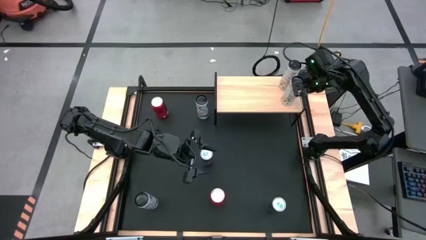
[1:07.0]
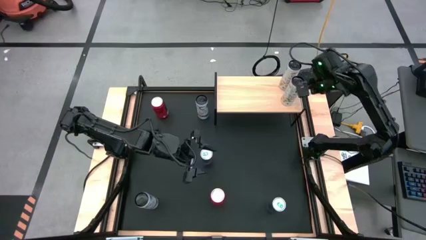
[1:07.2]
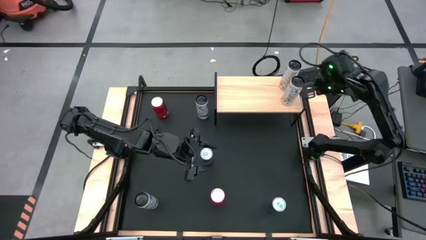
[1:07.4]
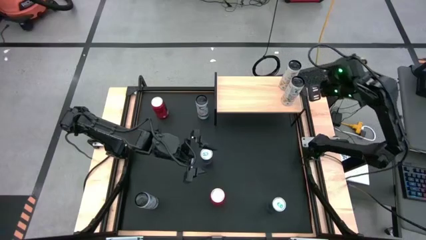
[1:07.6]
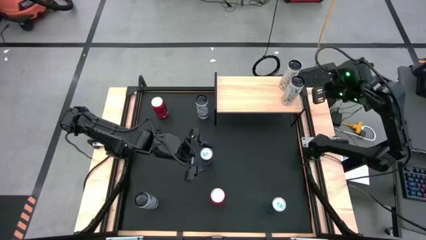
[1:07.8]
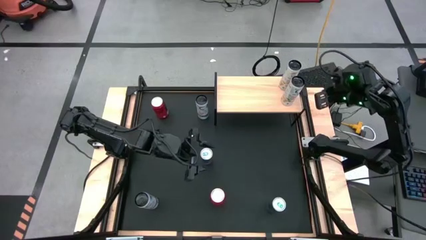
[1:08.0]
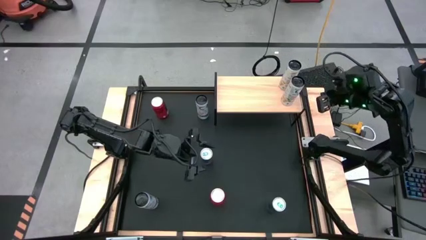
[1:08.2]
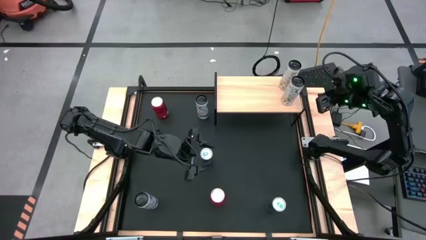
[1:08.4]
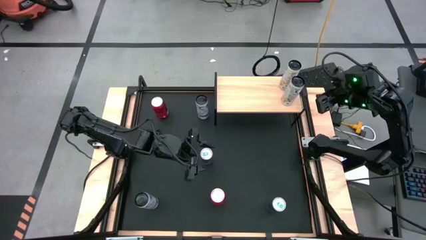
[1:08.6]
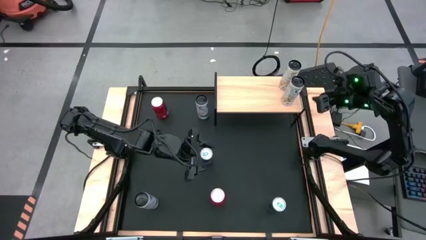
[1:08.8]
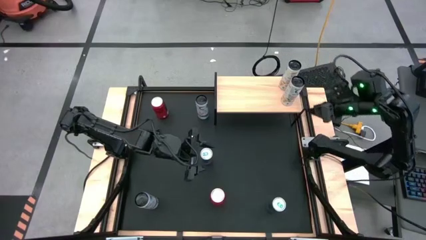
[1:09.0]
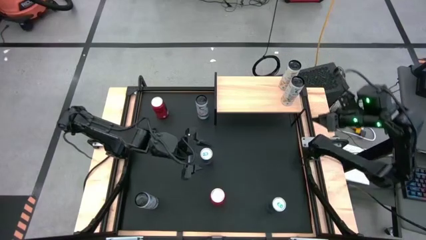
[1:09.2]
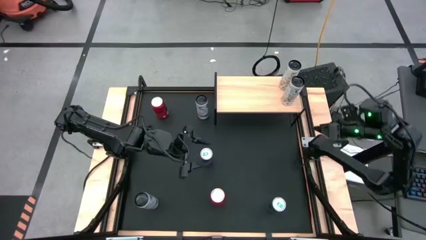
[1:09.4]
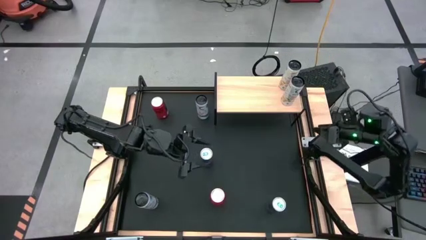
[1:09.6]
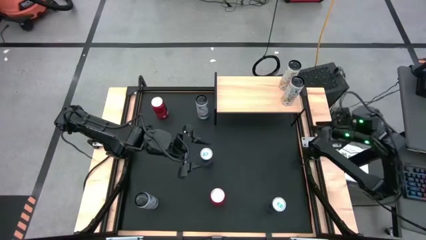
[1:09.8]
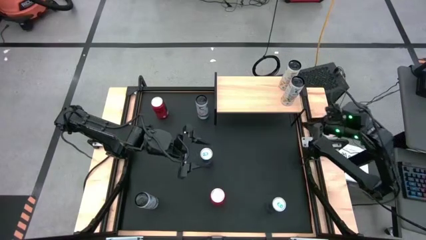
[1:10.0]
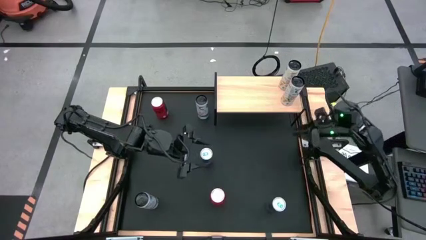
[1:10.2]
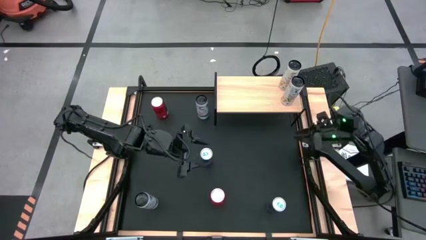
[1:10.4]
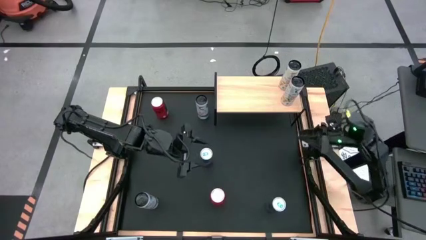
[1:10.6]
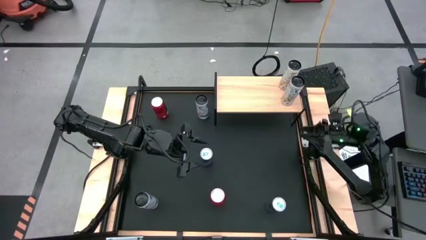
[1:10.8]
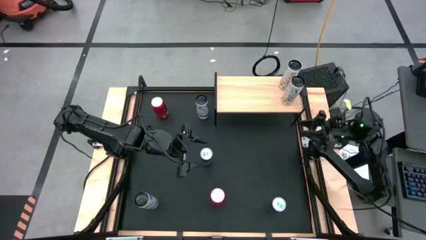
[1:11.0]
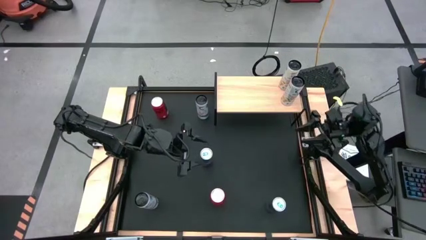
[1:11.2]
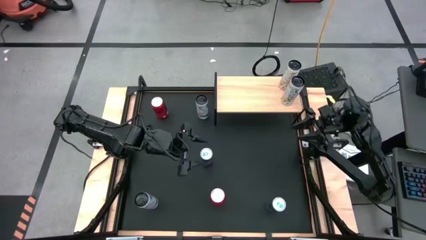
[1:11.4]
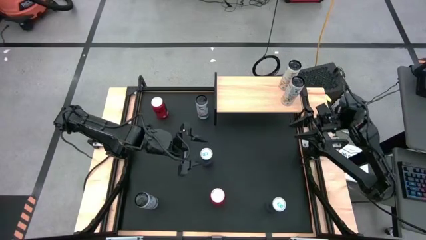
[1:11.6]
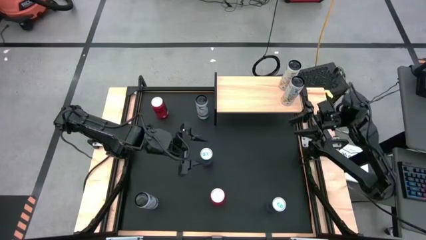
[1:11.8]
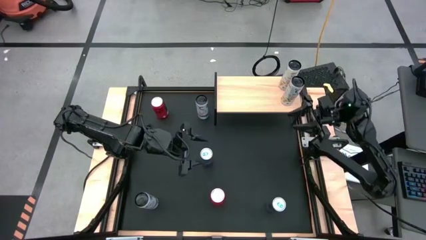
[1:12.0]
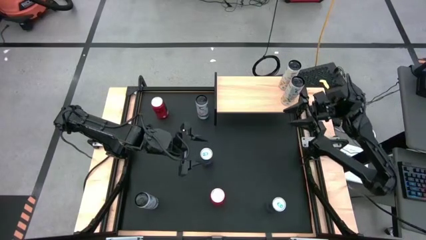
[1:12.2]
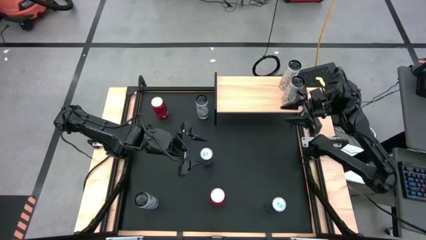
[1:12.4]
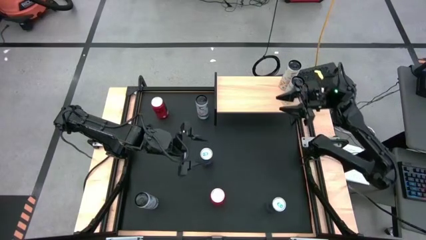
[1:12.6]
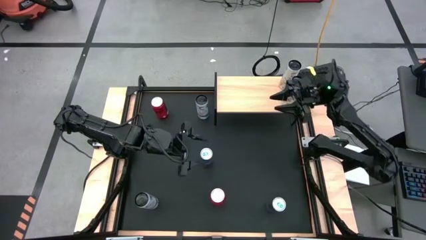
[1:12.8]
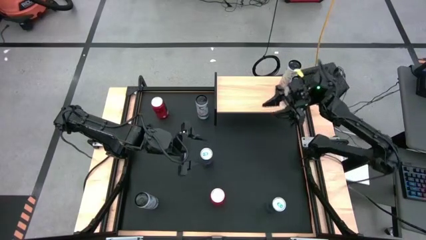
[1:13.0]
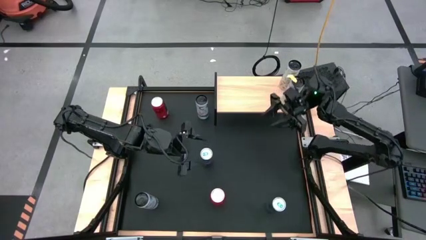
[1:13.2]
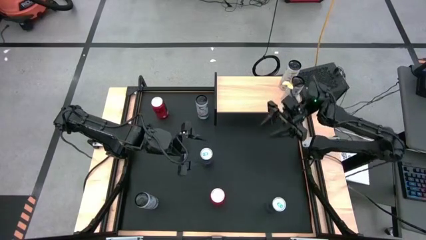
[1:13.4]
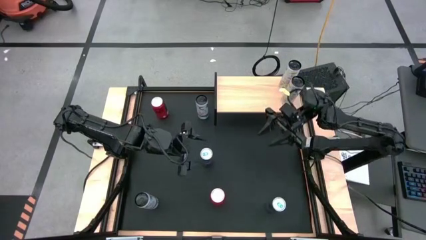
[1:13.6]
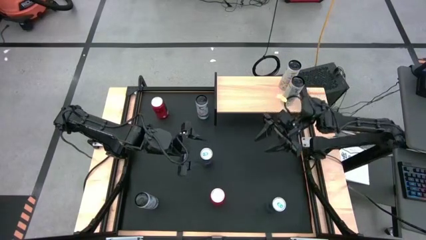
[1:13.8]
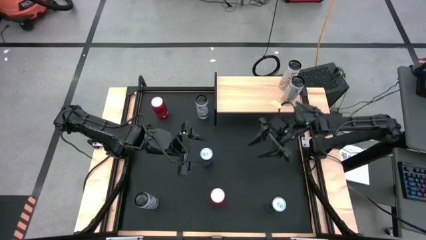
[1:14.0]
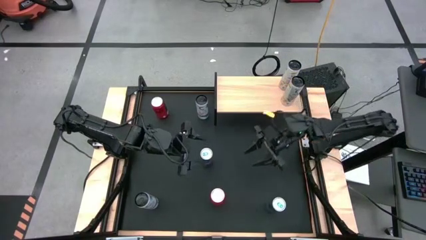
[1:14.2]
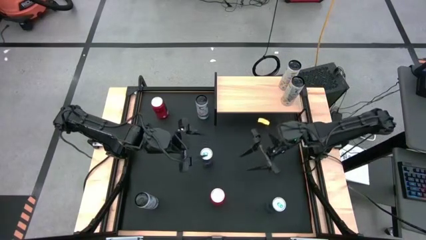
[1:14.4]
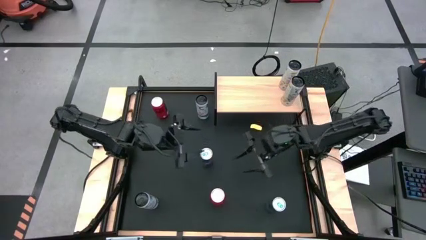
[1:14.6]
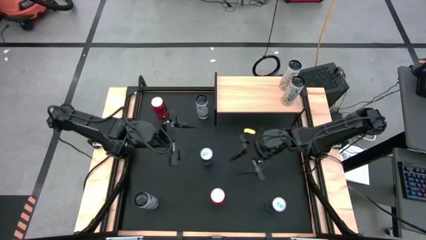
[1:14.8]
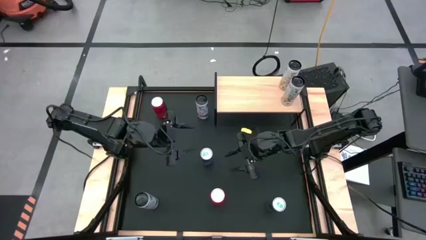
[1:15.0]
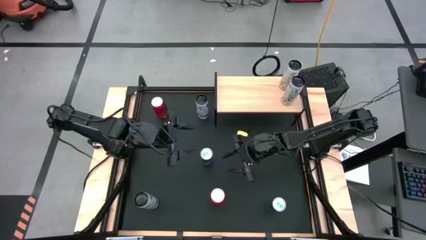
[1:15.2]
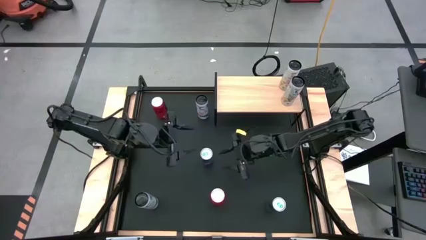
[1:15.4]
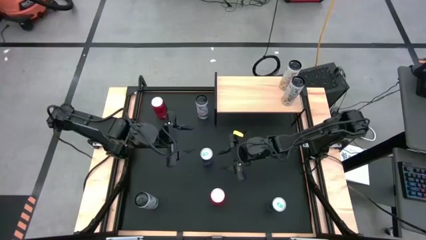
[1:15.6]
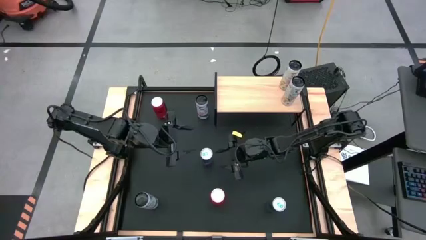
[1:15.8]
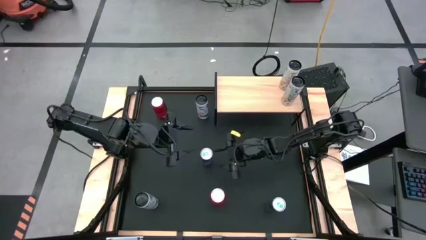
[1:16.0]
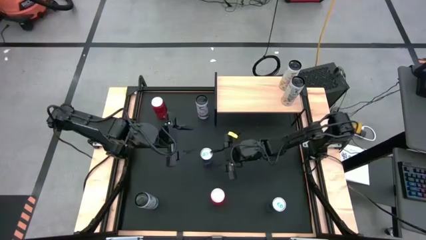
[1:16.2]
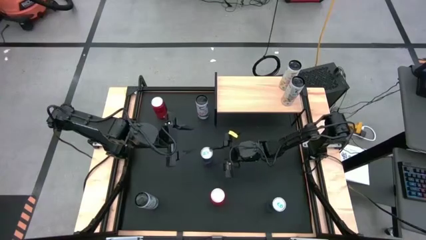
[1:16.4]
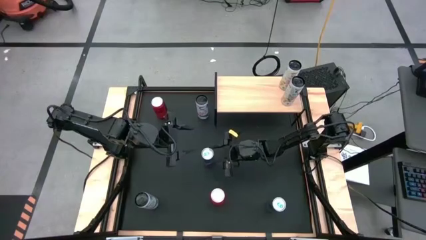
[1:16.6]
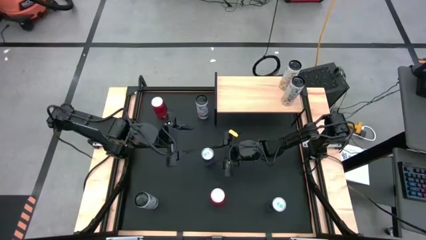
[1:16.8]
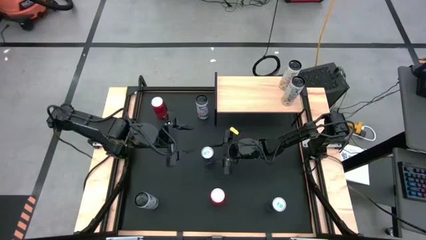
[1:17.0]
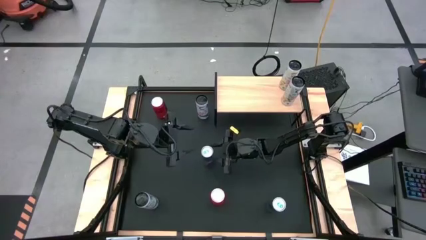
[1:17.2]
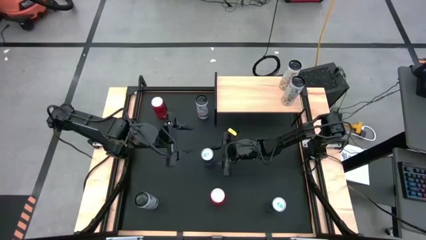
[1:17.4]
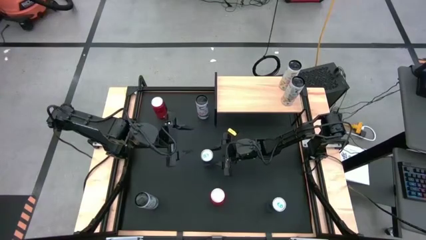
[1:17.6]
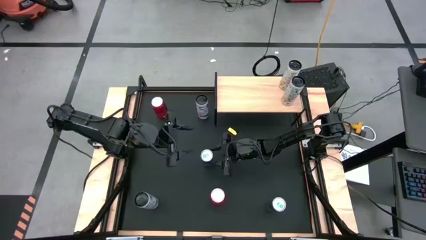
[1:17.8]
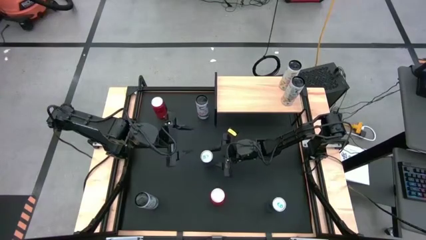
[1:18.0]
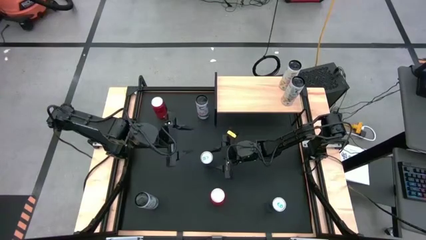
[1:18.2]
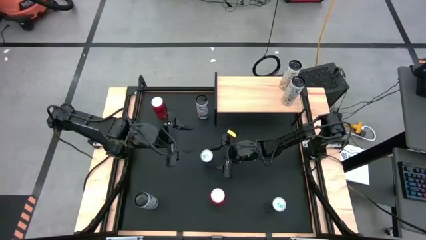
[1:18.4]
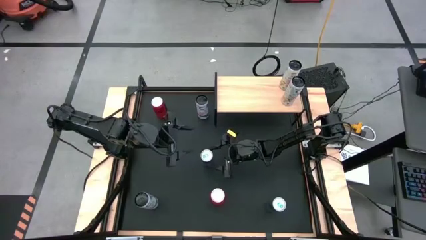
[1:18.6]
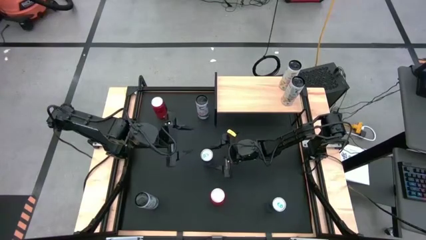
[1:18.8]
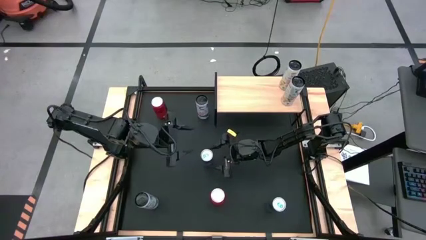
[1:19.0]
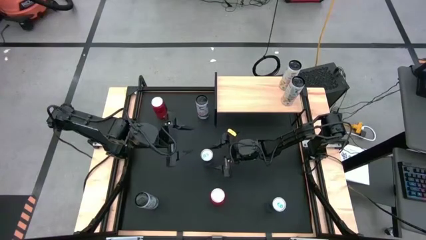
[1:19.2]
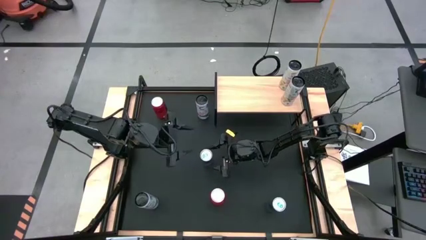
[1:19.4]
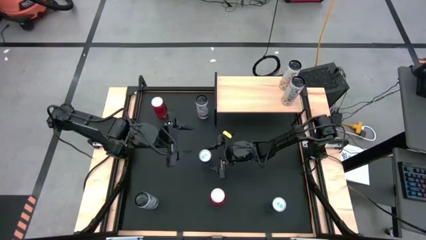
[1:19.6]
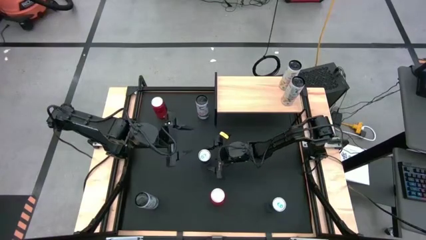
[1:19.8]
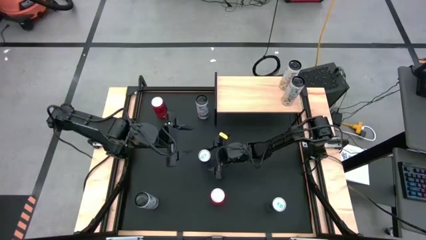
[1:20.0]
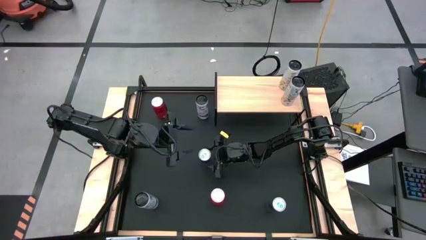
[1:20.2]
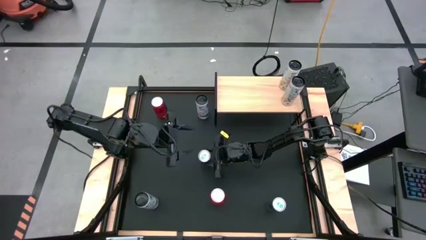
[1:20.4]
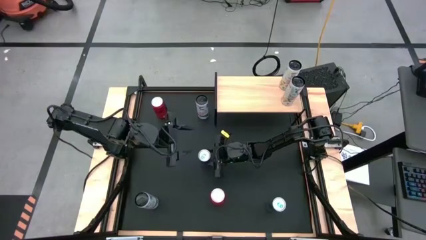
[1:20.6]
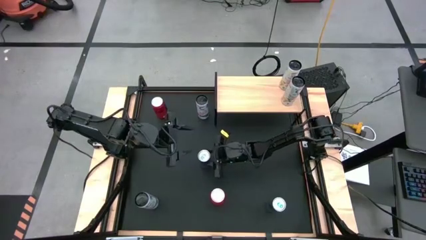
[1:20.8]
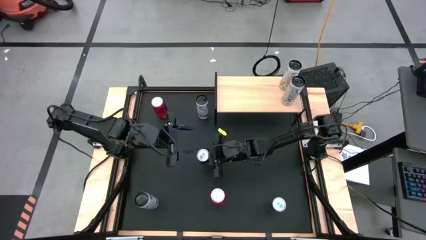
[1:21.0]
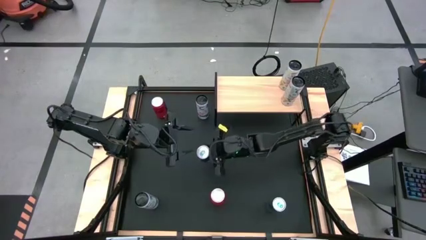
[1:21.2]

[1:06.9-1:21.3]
Task: Place canned beverage on shelf
Put the left blue soda can on the shelf
